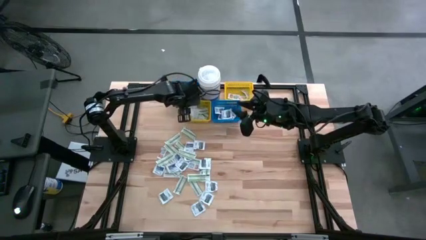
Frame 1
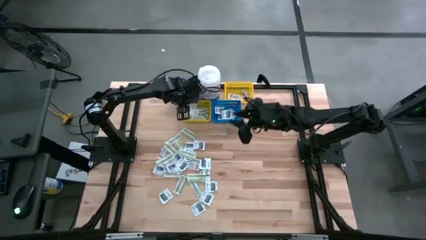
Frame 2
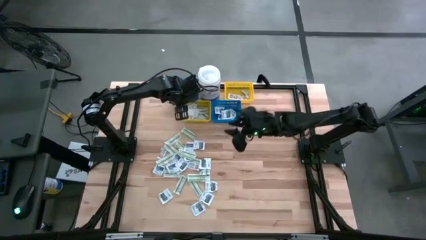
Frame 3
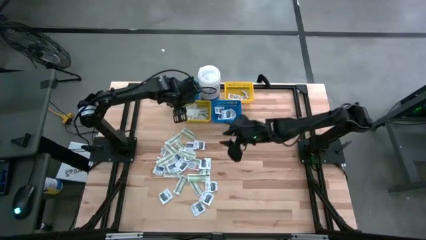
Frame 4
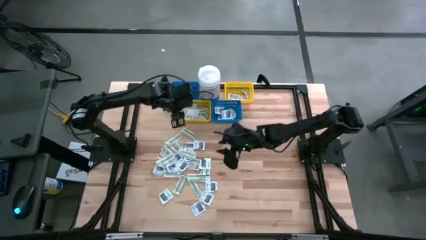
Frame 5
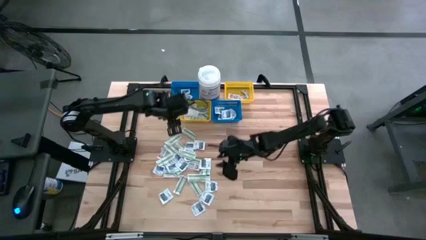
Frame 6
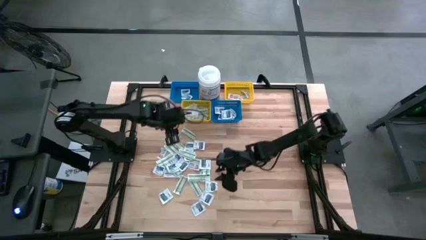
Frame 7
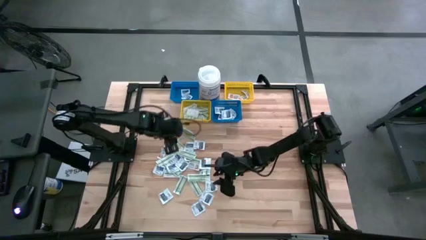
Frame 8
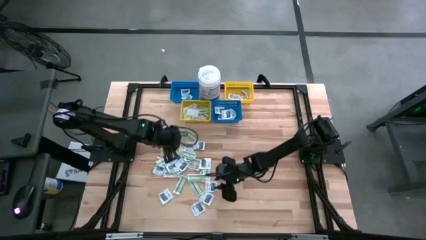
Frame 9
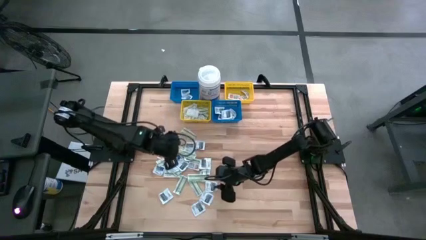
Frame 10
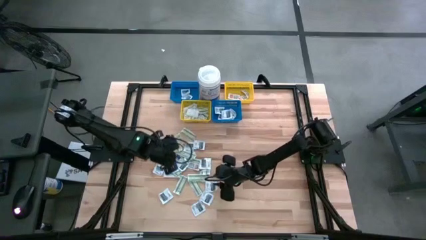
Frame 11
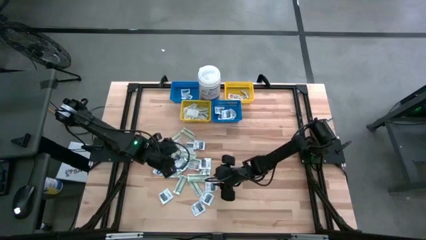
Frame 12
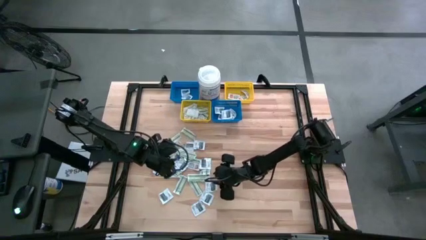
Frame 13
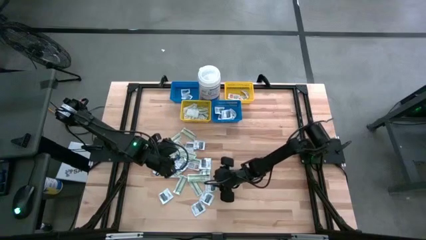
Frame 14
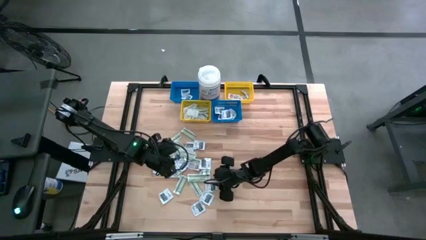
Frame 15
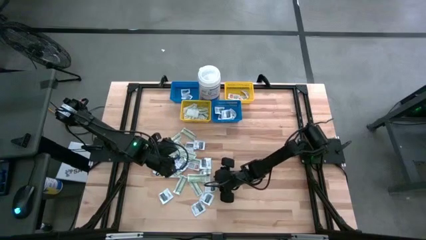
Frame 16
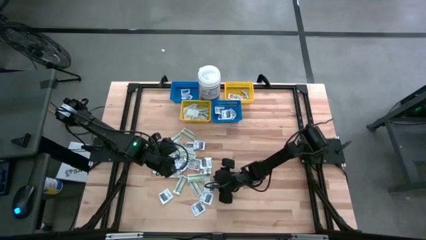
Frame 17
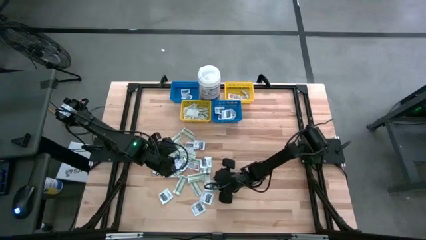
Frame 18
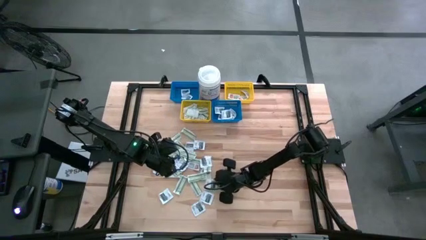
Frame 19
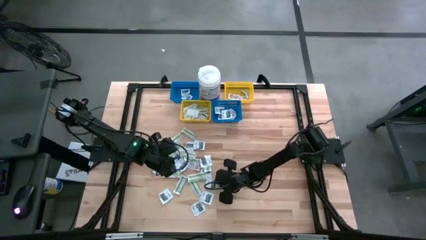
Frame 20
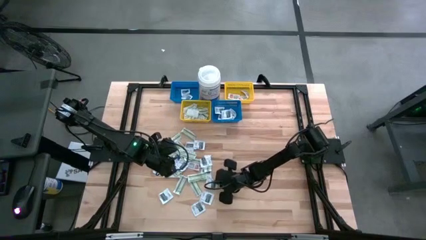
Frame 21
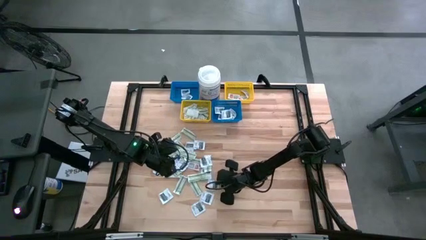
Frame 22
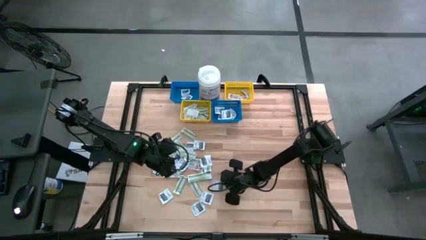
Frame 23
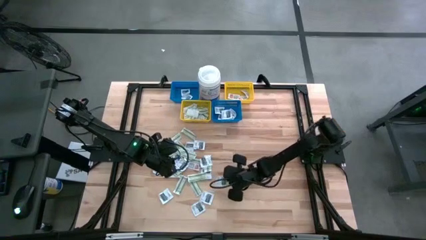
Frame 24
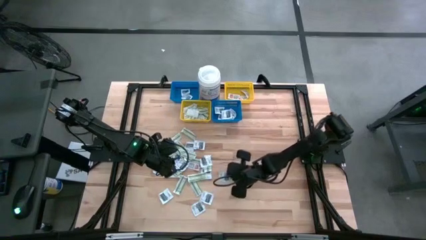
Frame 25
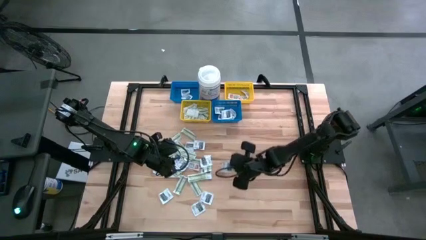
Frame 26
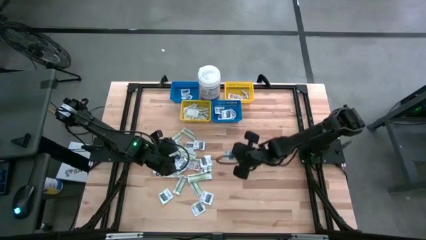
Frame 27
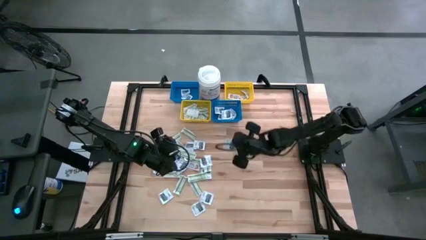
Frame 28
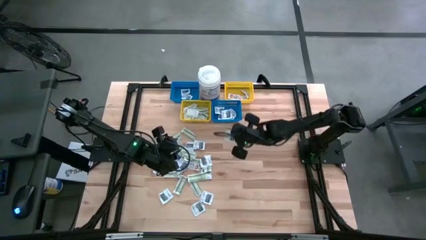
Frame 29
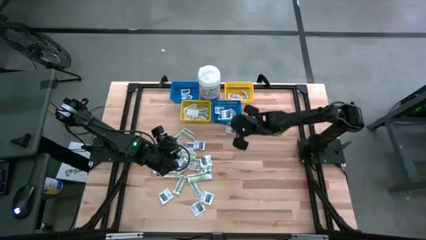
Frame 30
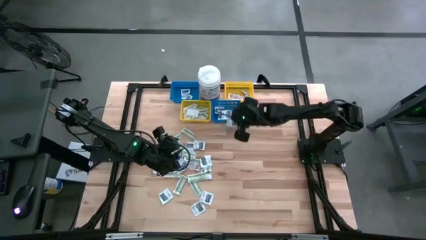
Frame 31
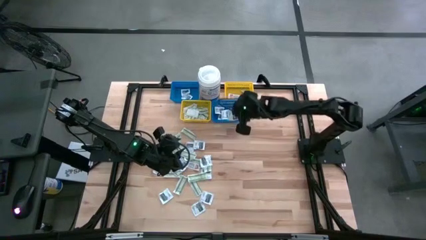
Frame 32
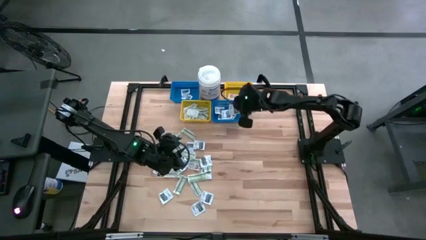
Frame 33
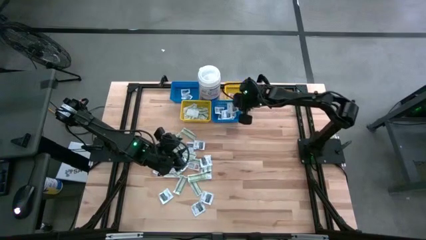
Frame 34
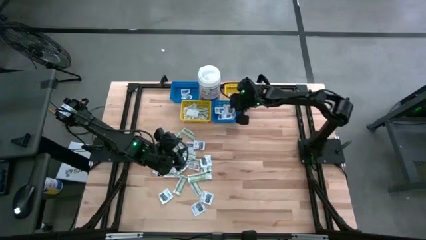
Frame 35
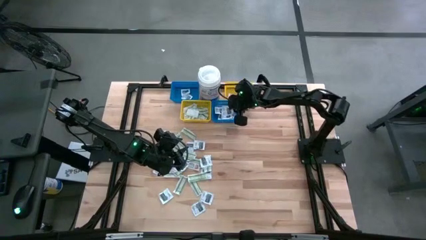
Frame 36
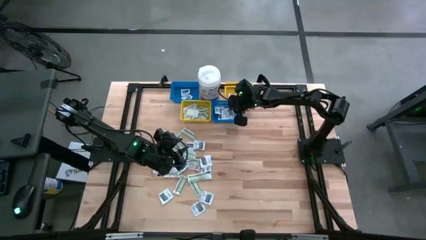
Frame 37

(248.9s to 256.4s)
Task: Pick & Place First Aid Supplies
Put the black towelette pack into the right blue bin

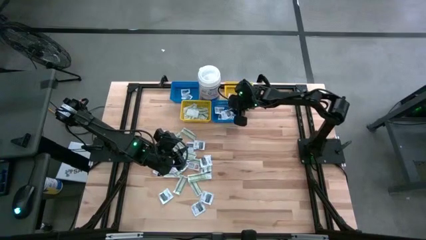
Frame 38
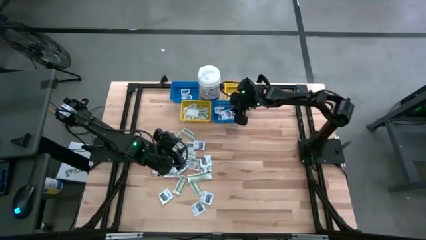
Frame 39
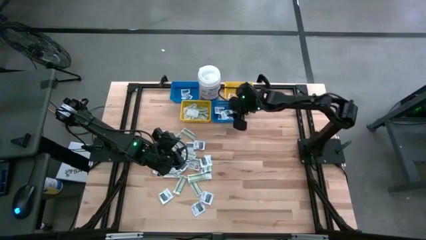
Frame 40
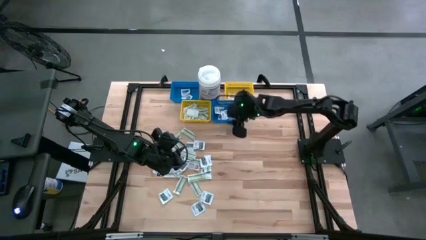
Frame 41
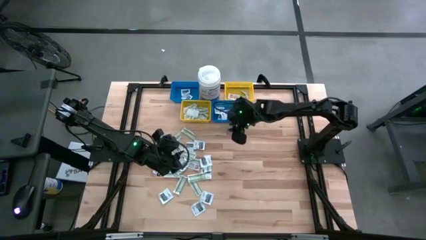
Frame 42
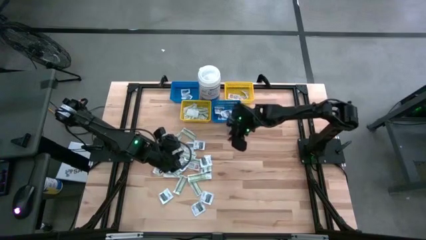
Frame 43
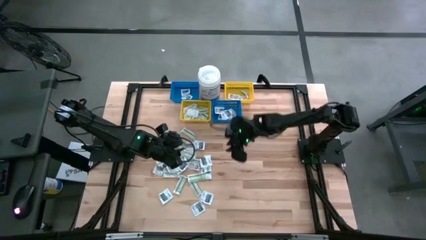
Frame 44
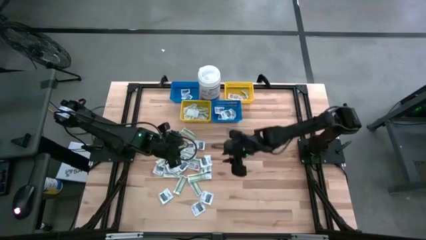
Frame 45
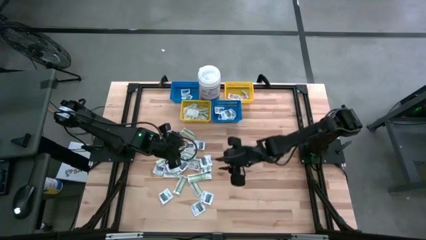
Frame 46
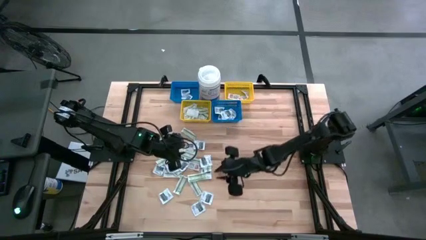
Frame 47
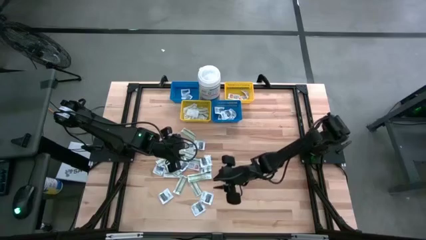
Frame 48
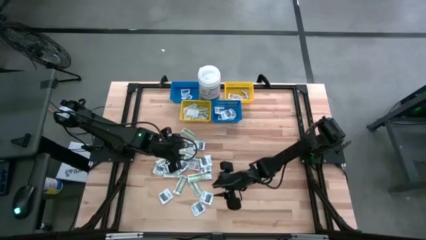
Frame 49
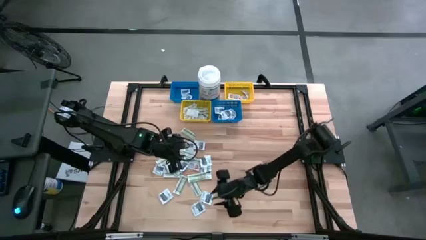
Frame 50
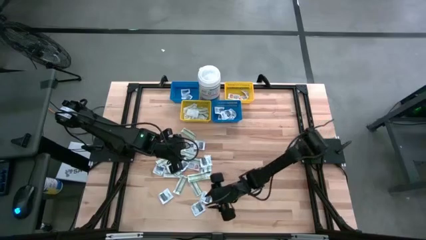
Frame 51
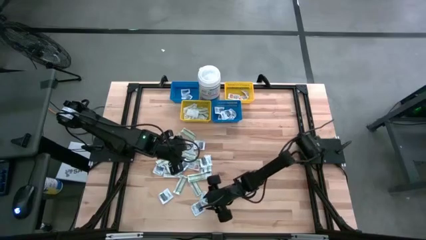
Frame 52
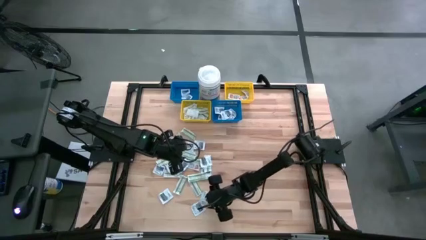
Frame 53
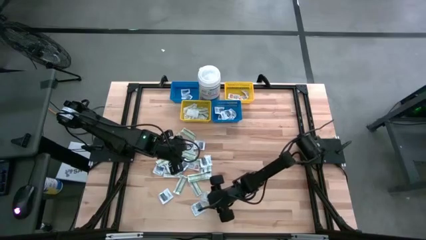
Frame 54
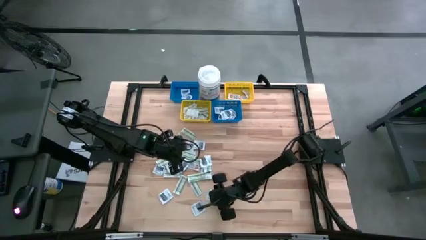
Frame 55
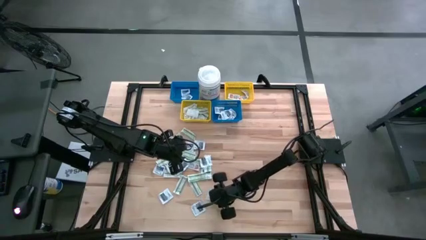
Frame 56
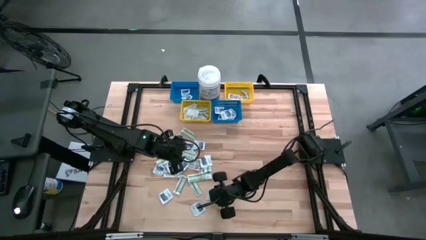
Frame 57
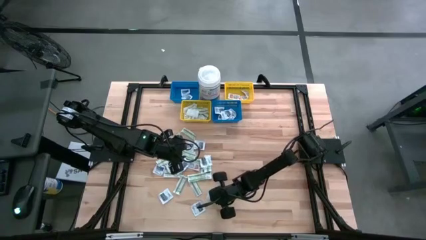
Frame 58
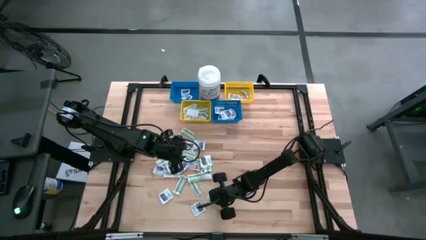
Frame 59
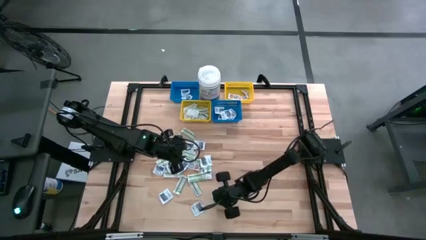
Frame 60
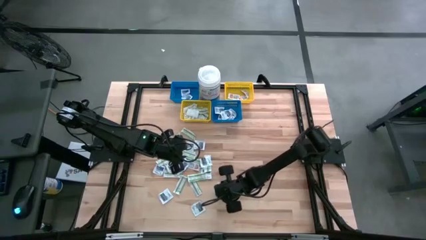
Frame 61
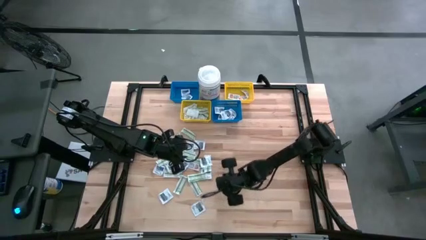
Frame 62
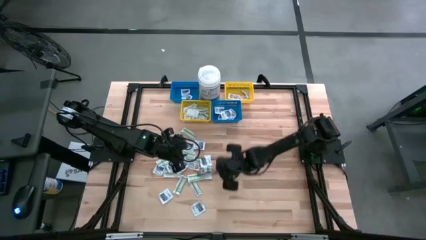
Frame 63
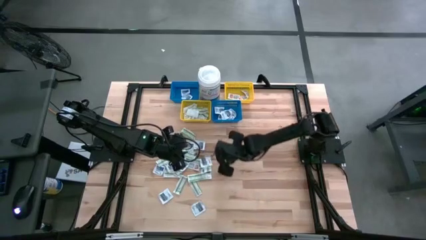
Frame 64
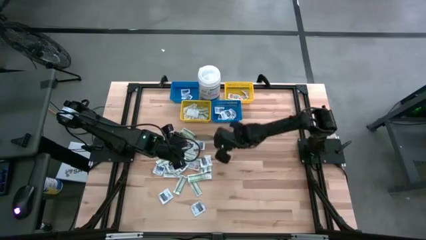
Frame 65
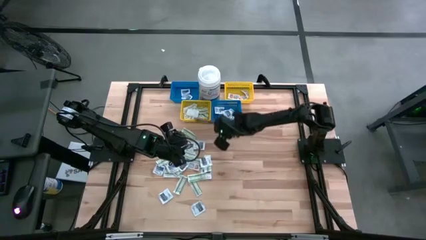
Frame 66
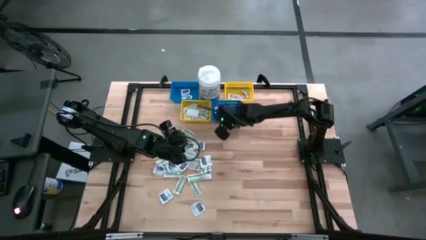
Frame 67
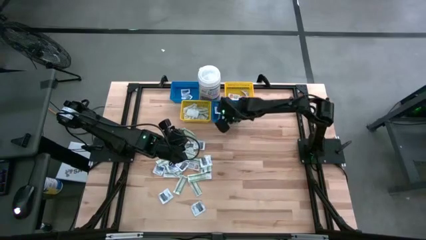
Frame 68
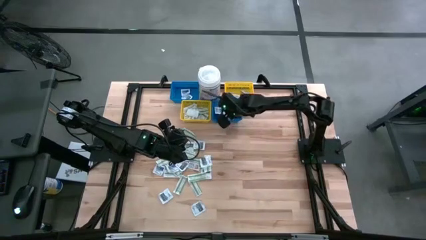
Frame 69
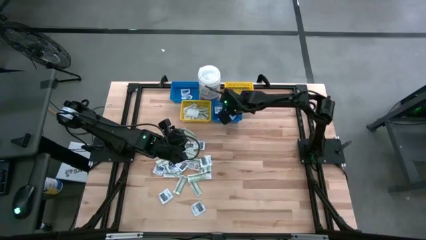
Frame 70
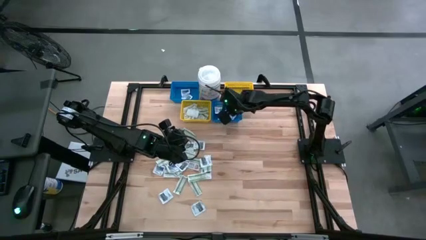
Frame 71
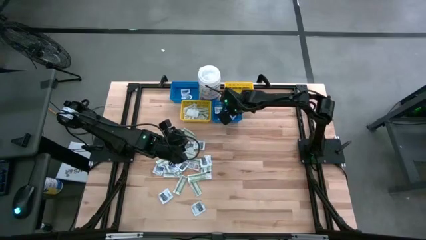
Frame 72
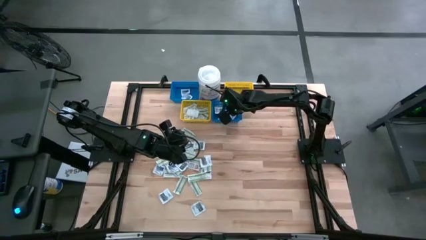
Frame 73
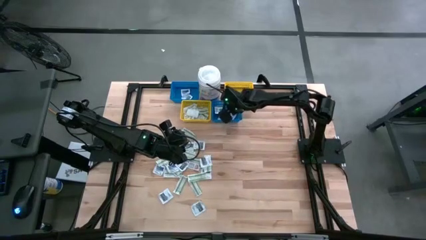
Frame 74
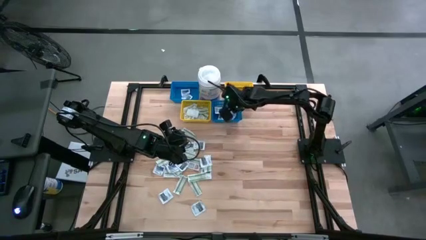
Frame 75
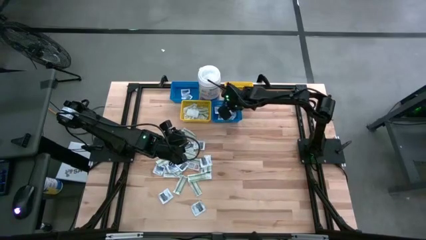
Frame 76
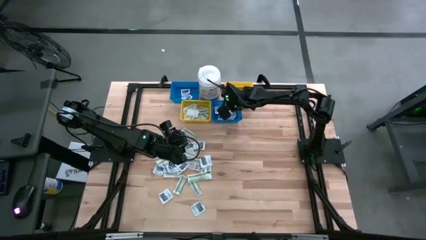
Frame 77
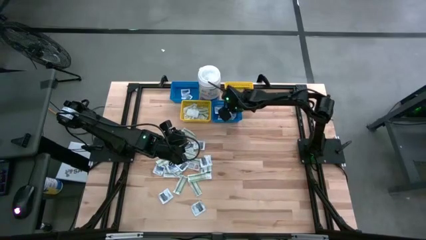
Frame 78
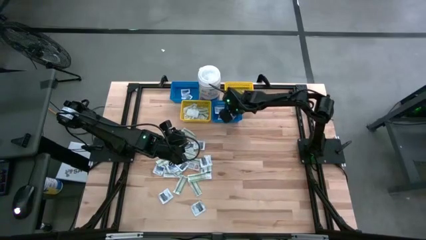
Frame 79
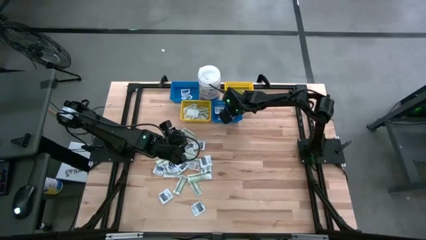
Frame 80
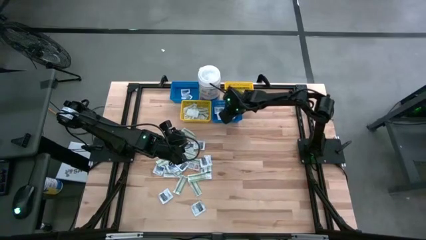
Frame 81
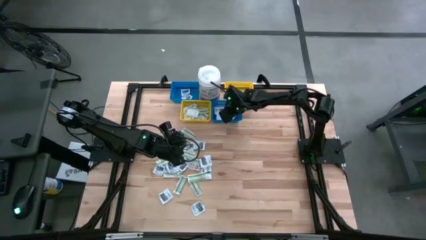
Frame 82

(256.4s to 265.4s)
Put the black towelette pack into the right blue bin
